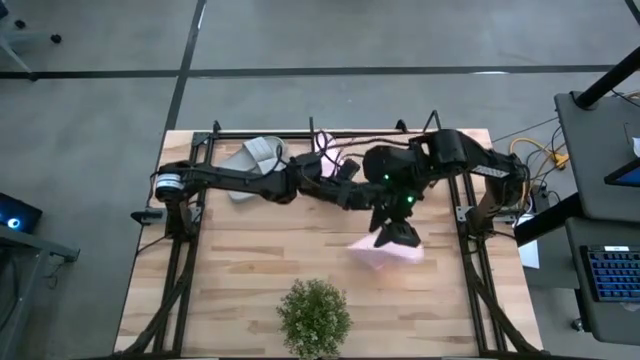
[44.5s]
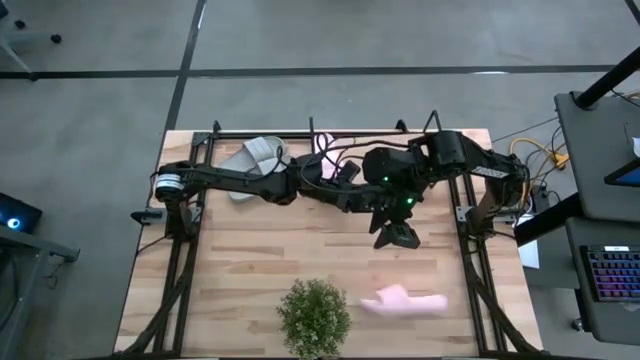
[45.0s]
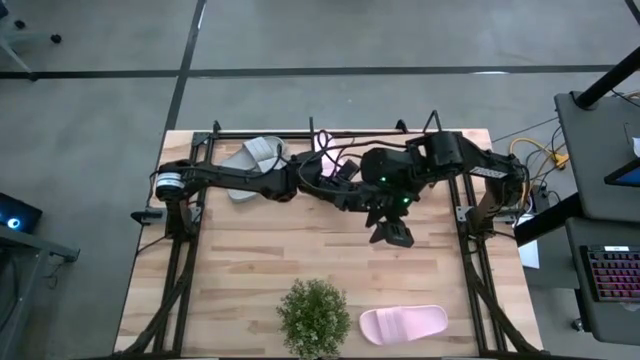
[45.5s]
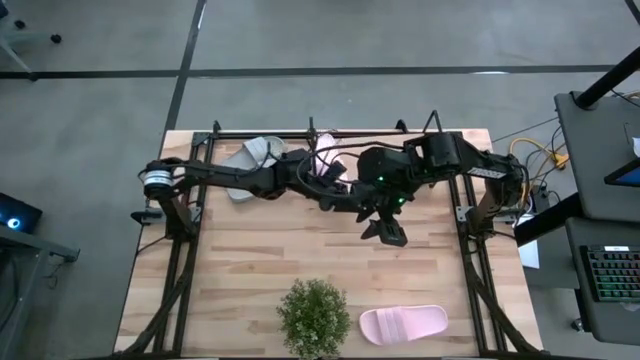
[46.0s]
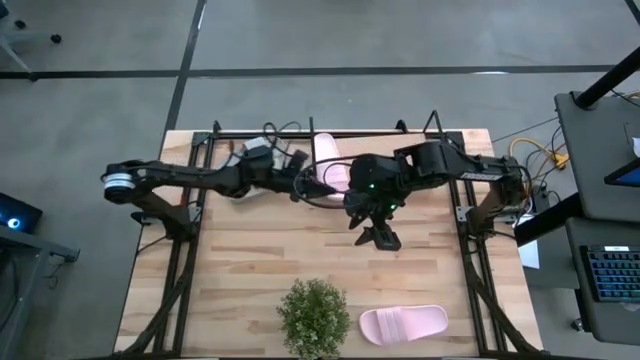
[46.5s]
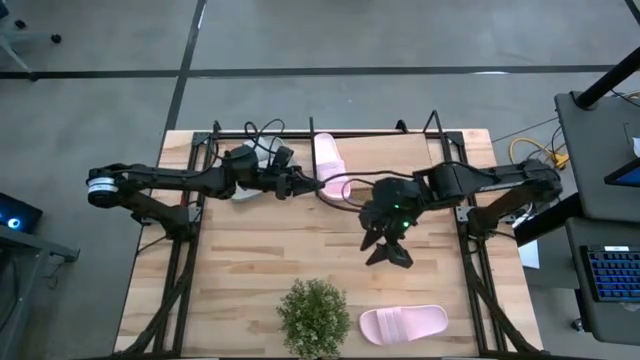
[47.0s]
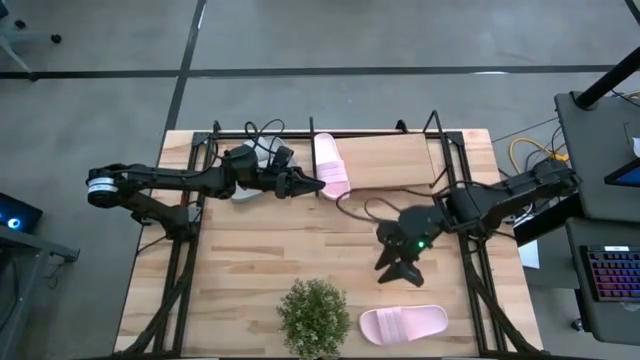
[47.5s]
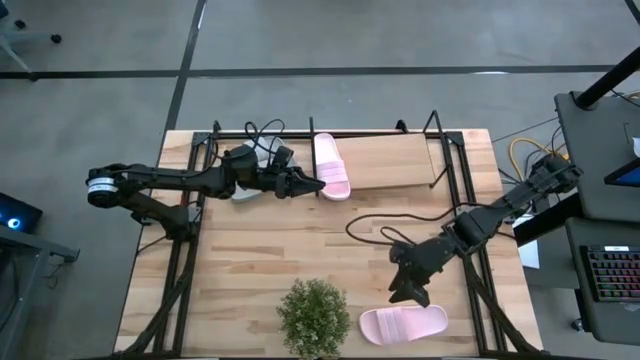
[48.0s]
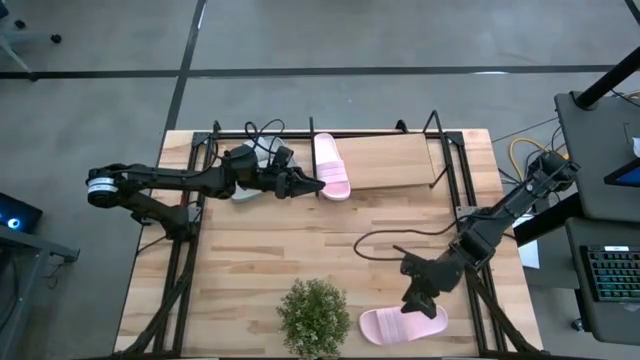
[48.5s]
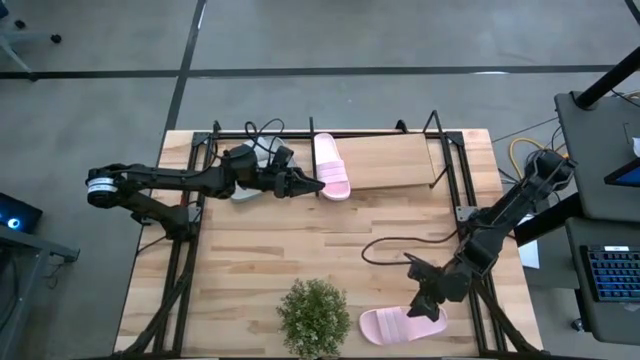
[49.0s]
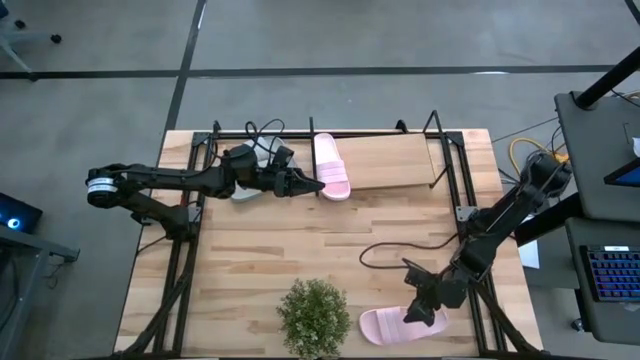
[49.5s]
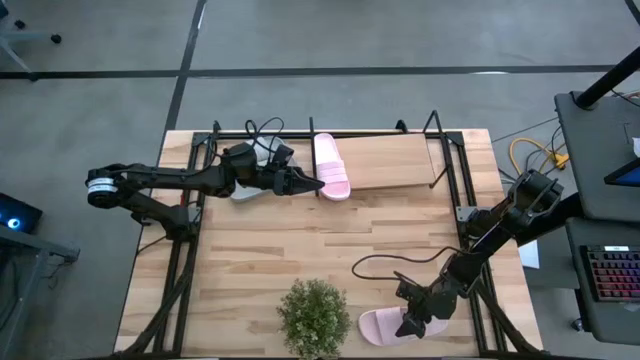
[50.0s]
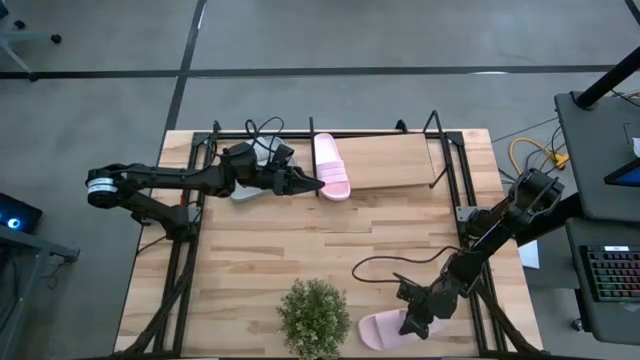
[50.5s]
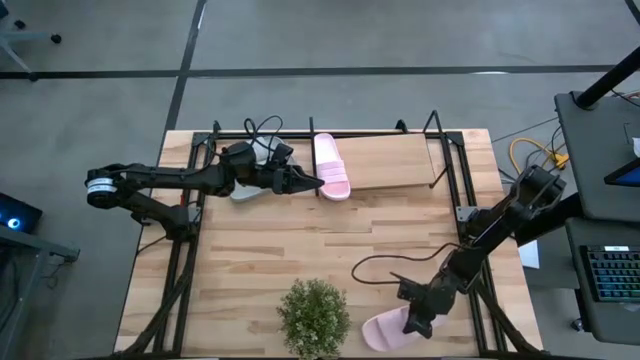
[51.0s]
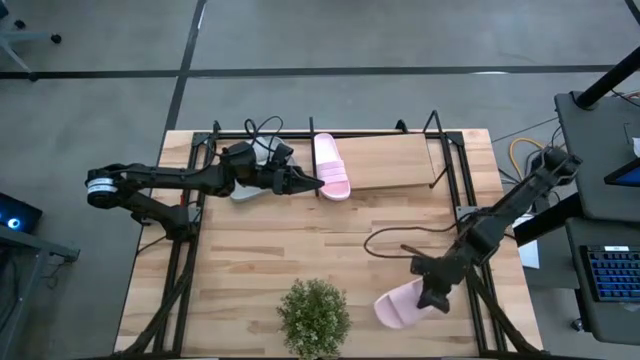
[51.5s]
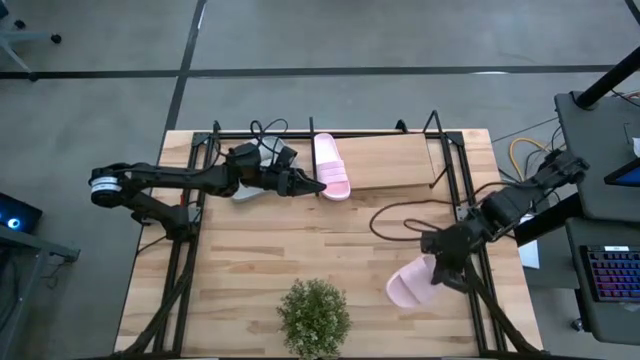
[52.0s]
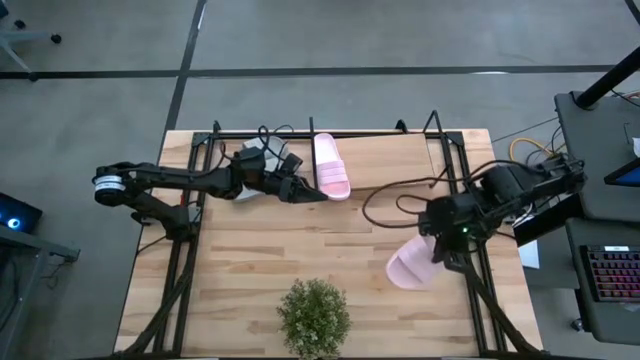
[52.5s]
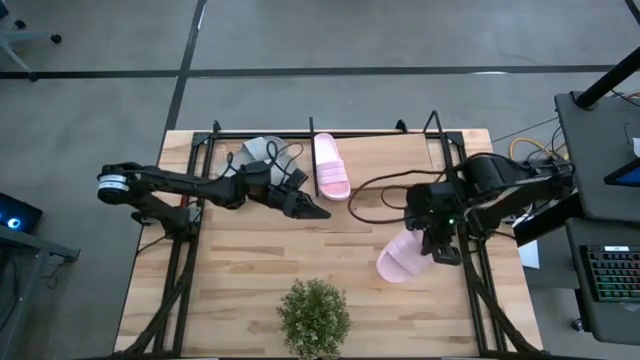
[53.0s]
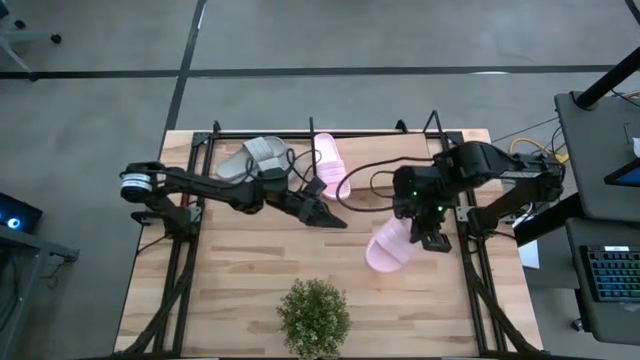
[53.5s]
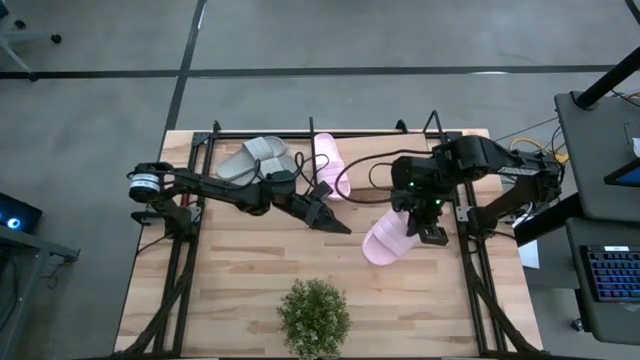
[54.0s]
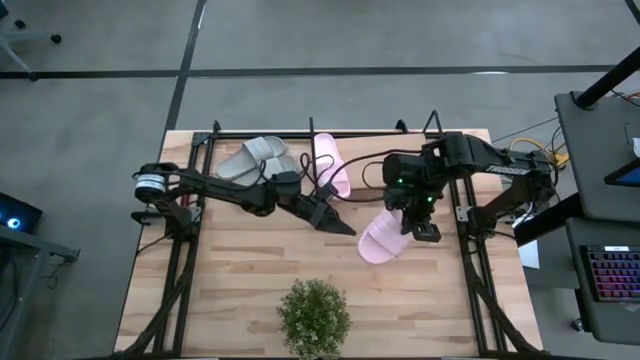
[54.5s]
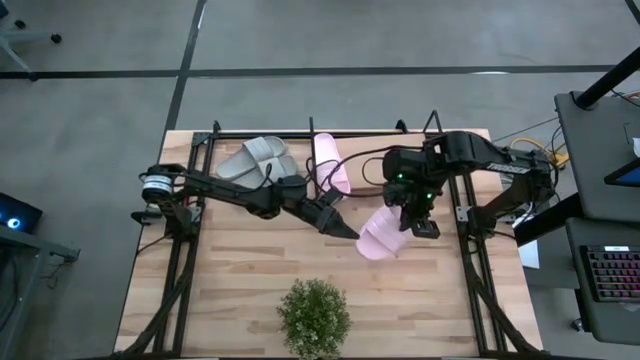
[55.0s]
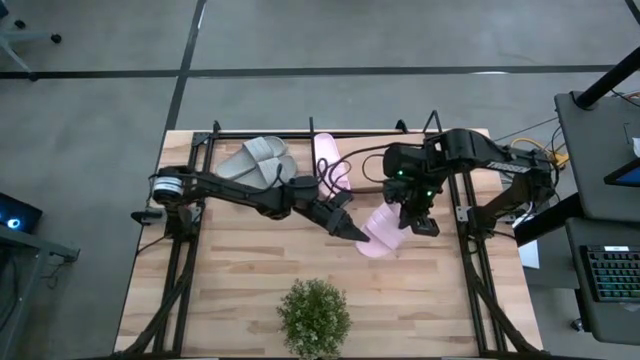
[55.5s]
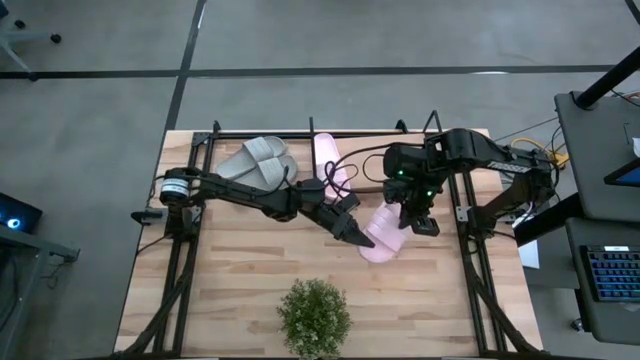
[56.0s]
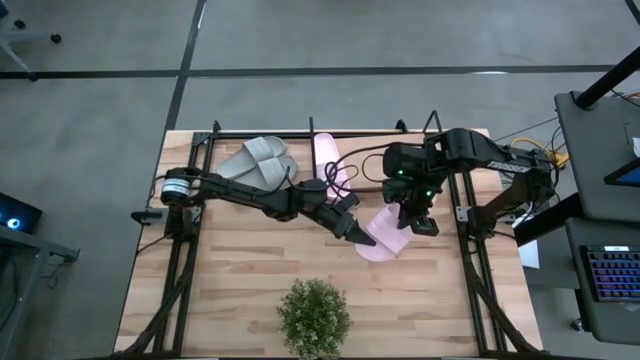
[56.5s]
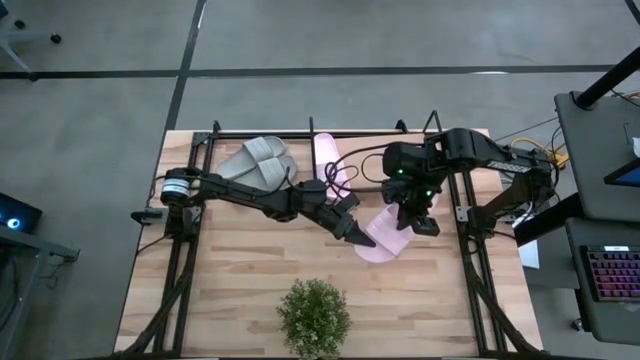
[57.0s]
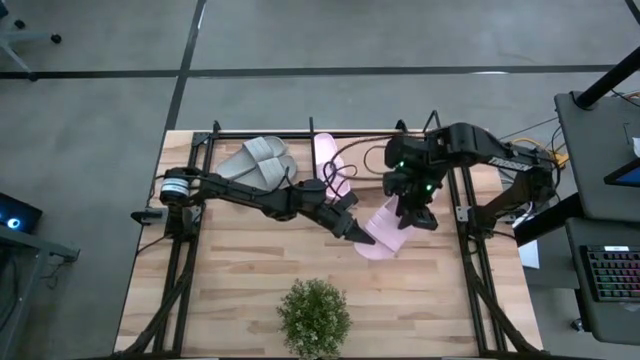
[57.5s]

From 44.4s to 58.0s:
Task: Pick and place slides into the shelf
Put the pink slipper on the shelf

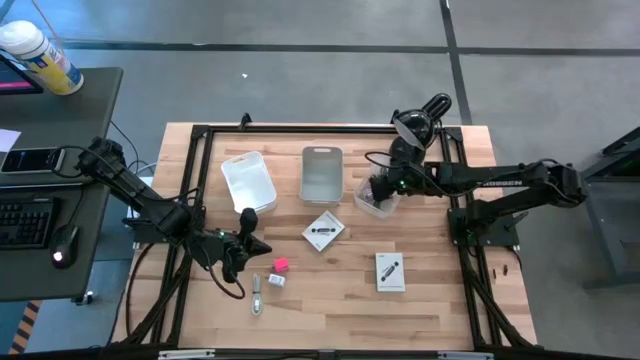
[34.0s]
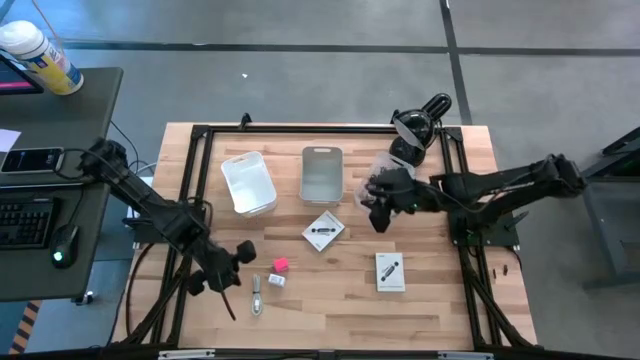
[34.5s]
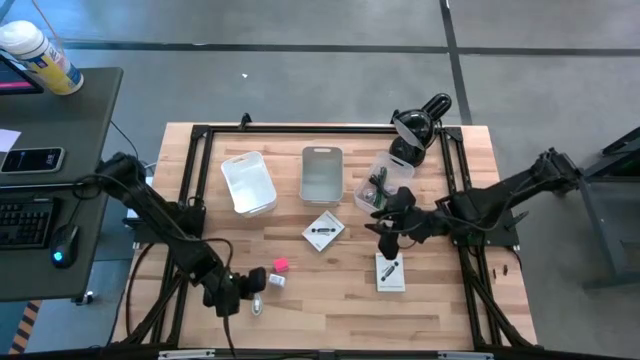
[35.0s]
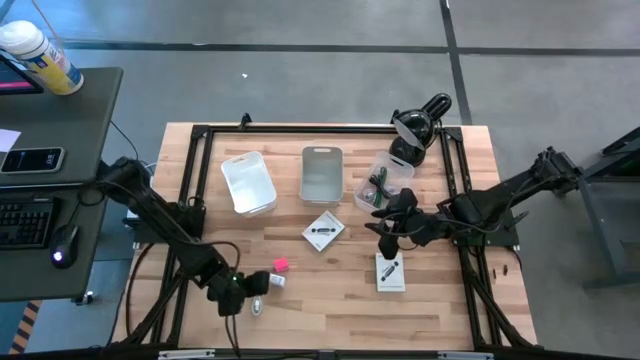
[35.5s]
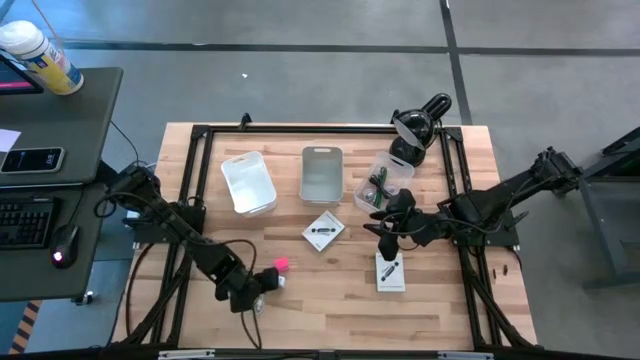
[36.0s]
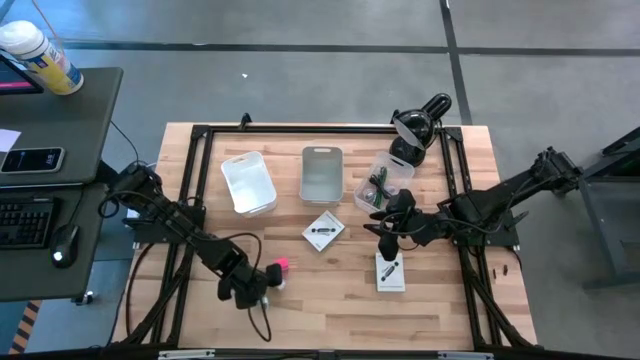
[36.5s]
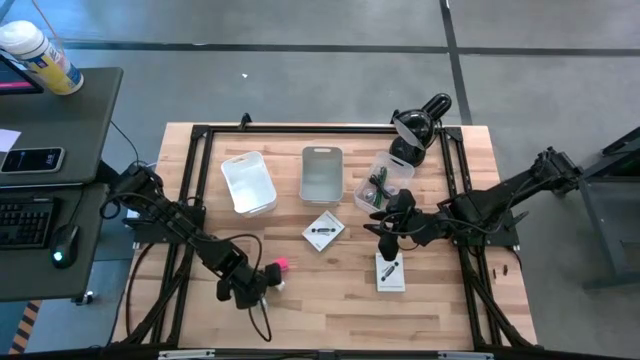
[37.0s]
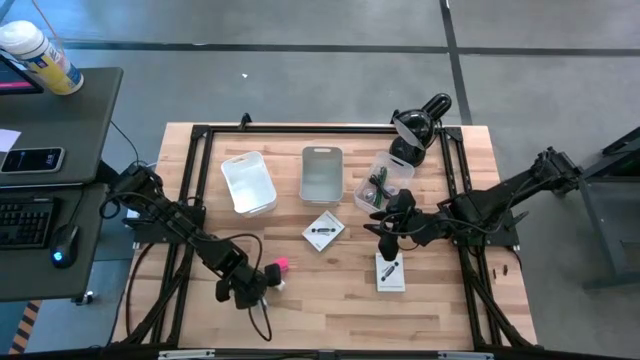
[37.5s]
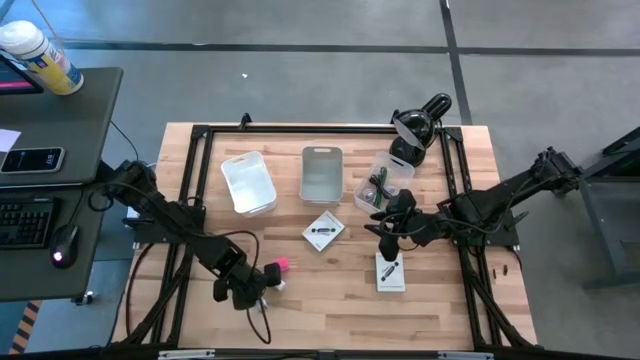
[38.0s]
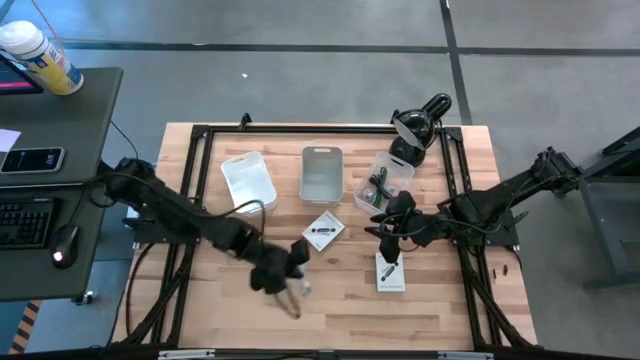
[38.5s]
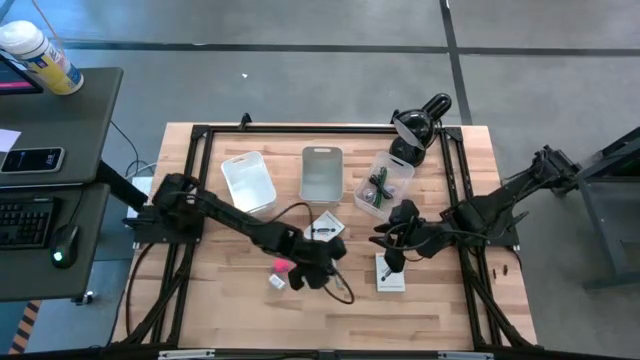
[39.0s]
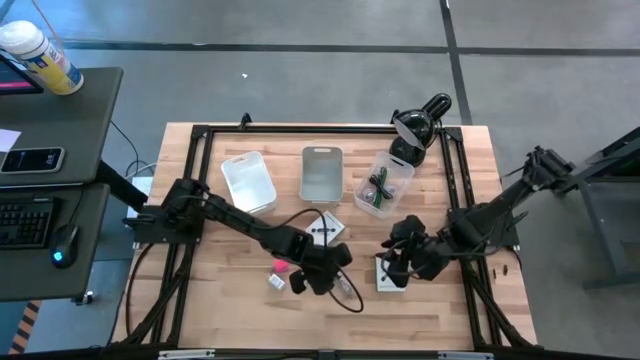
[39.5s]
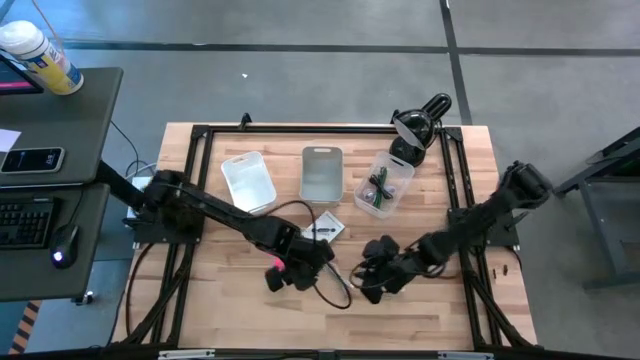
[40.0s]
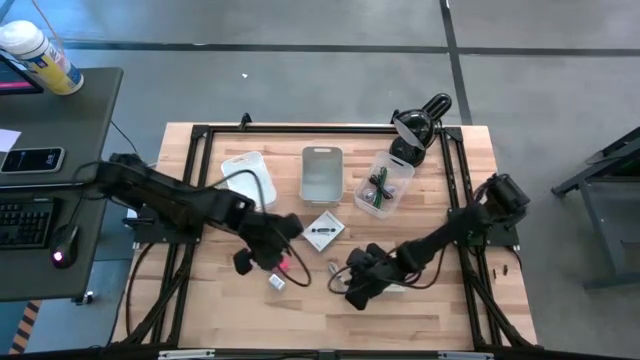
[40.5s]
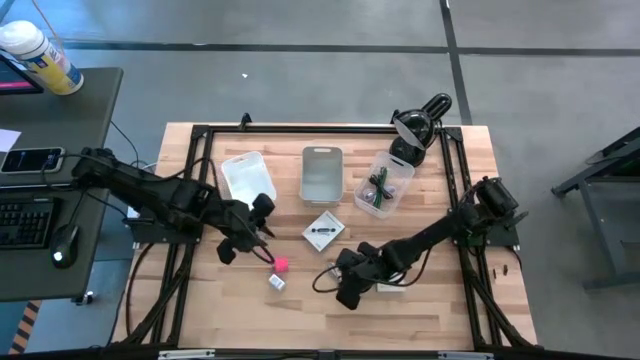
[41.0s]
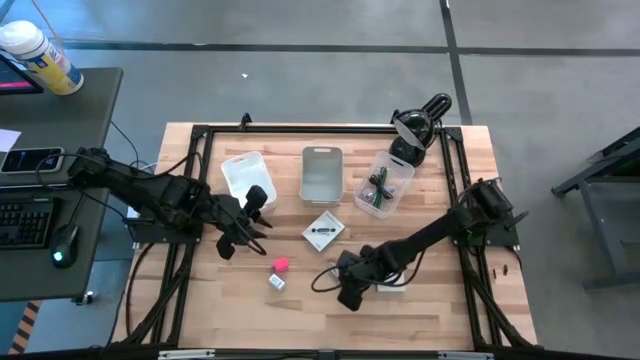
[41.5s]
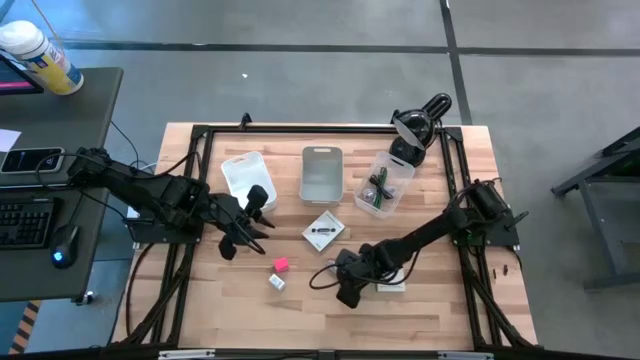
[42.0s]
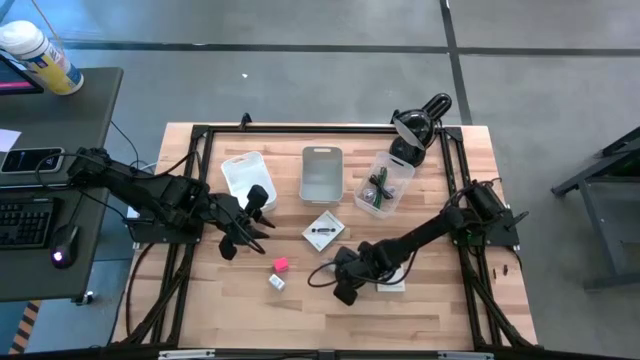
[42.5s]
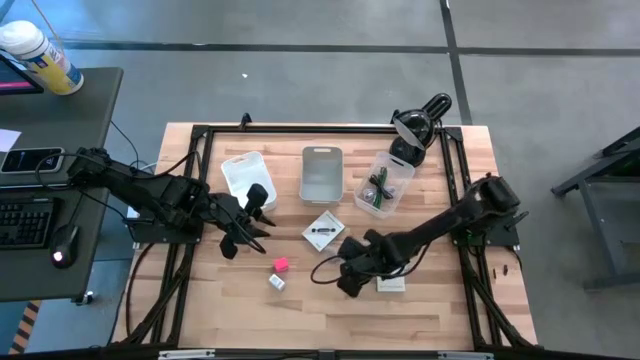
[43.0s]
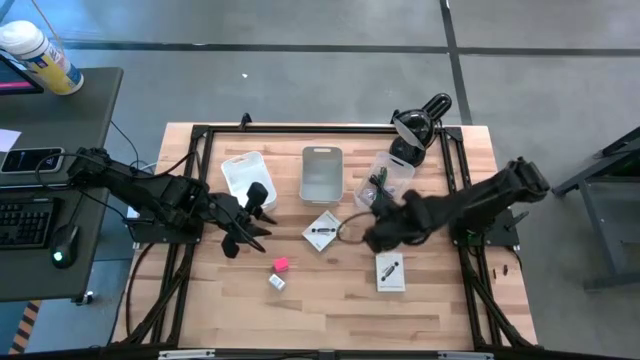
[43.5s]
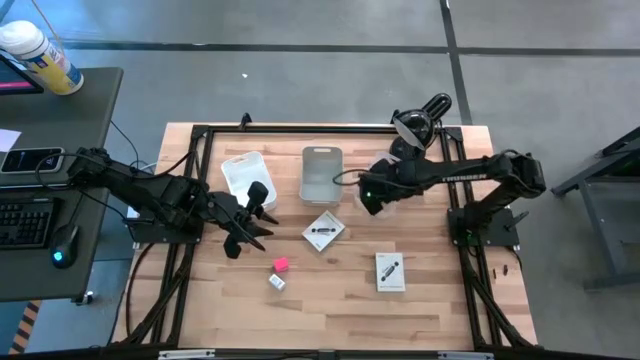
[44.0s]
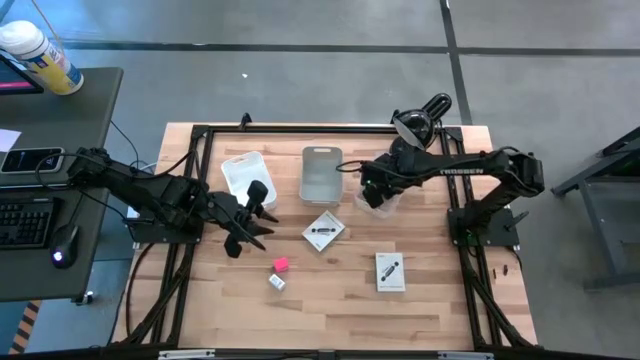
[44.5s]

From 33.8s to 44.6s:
Task: Pick and place items into bin
Put the white charger cable into the transparent bin
